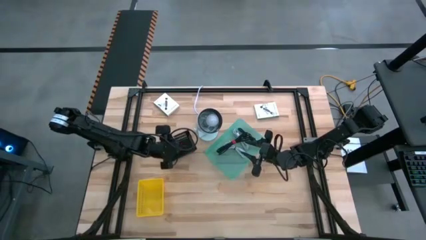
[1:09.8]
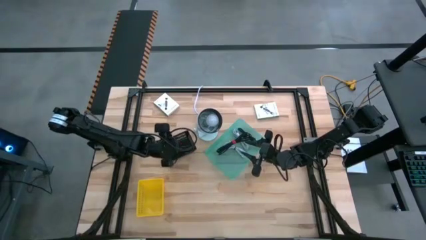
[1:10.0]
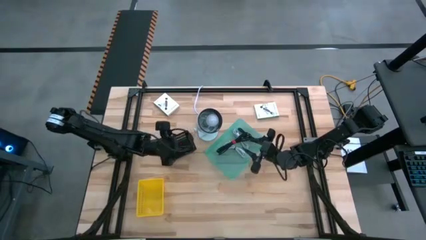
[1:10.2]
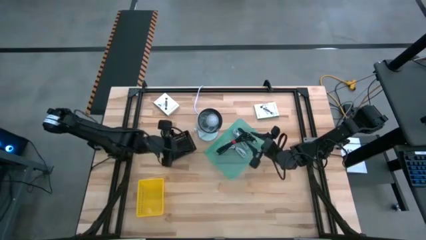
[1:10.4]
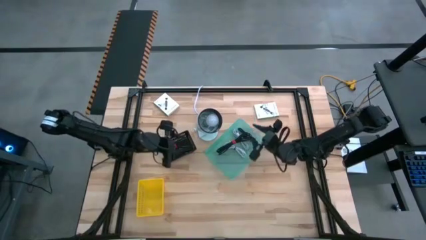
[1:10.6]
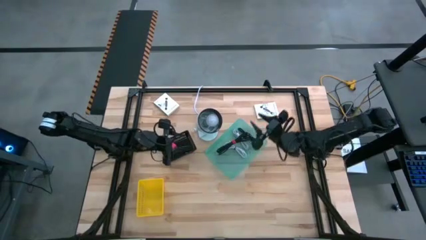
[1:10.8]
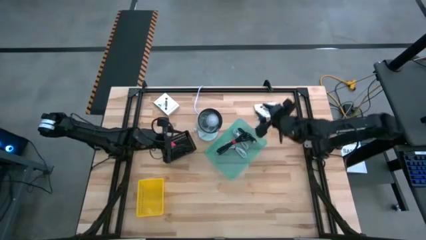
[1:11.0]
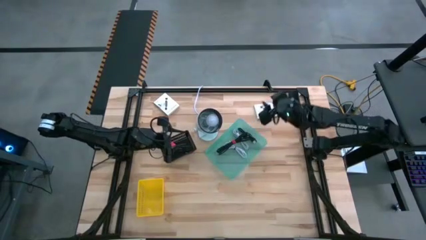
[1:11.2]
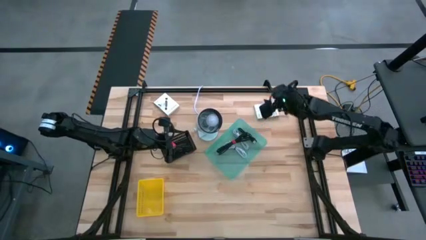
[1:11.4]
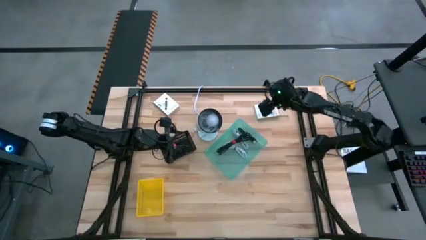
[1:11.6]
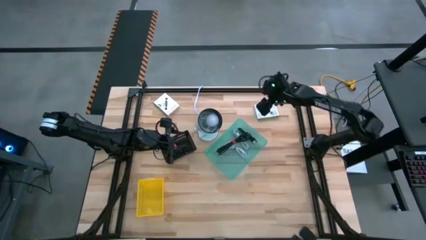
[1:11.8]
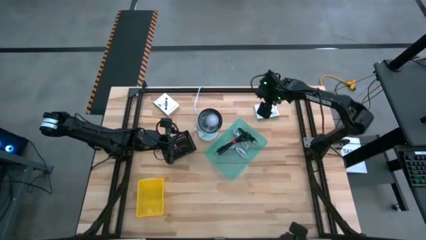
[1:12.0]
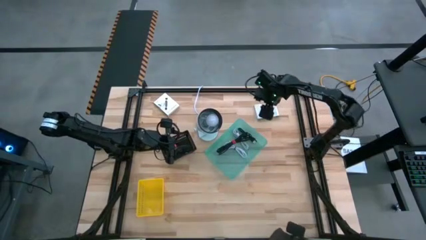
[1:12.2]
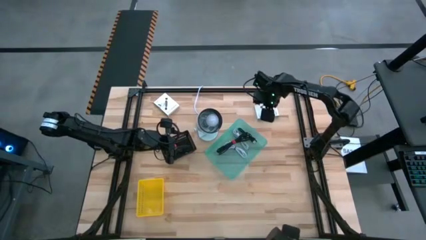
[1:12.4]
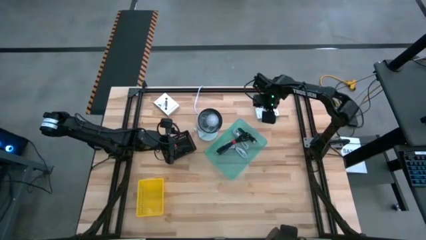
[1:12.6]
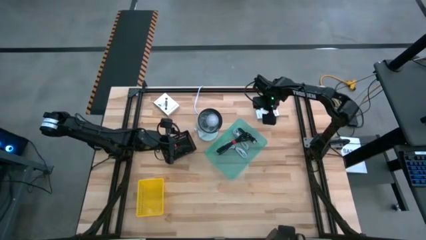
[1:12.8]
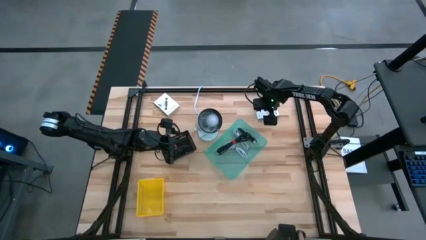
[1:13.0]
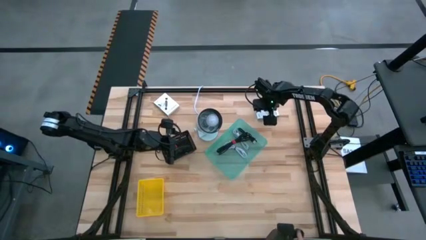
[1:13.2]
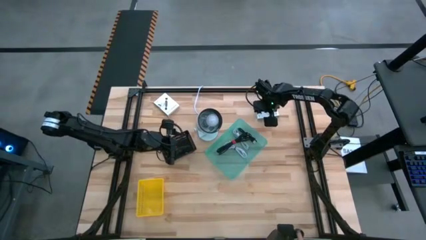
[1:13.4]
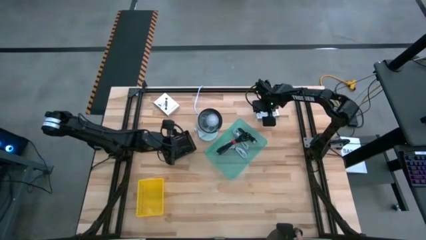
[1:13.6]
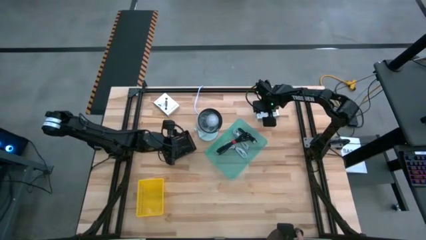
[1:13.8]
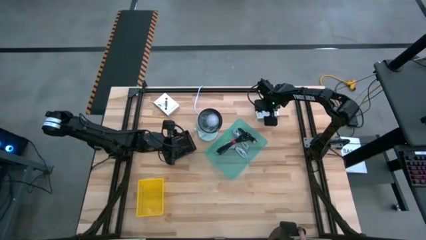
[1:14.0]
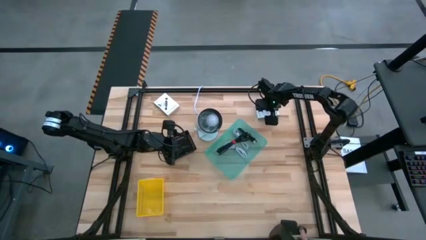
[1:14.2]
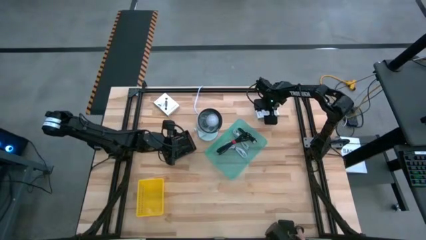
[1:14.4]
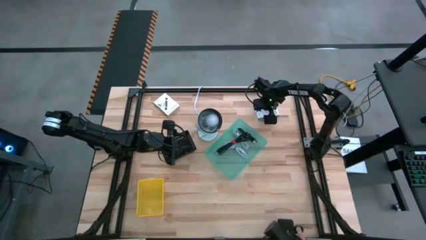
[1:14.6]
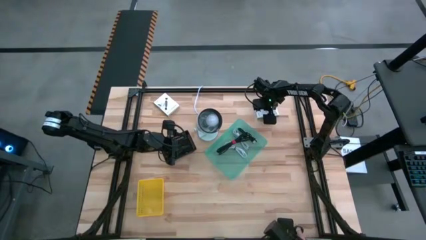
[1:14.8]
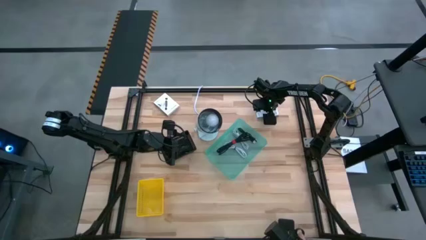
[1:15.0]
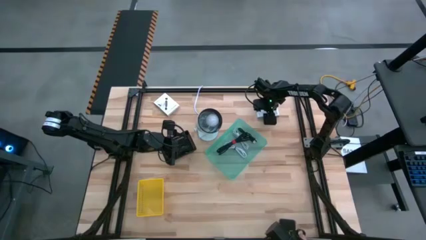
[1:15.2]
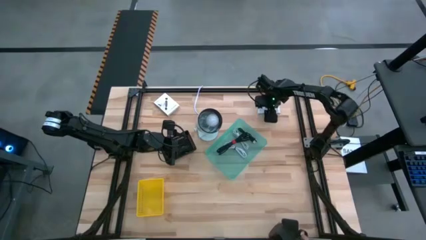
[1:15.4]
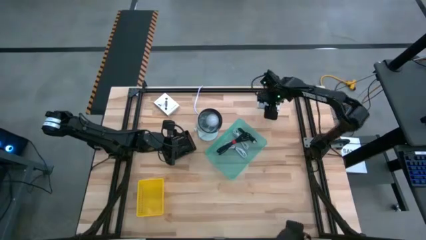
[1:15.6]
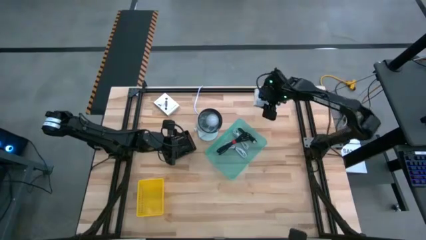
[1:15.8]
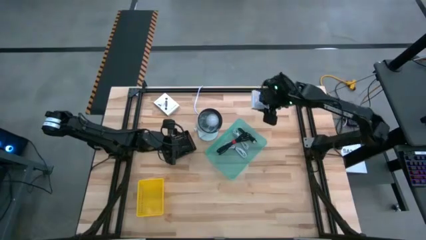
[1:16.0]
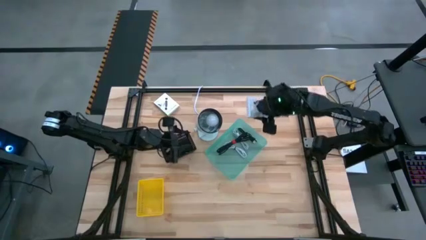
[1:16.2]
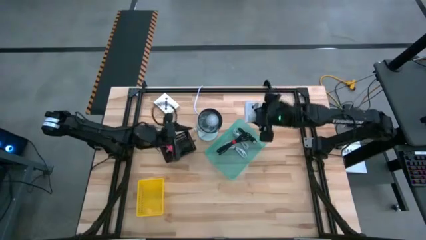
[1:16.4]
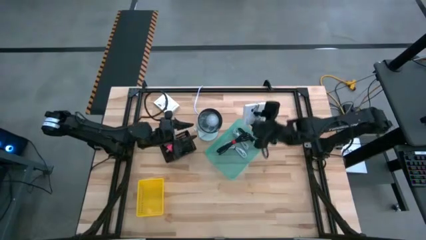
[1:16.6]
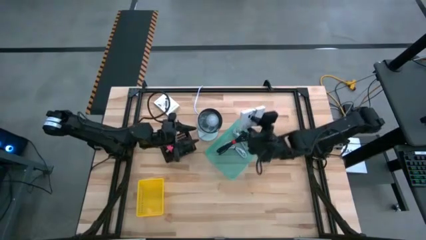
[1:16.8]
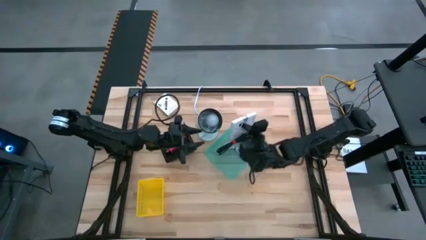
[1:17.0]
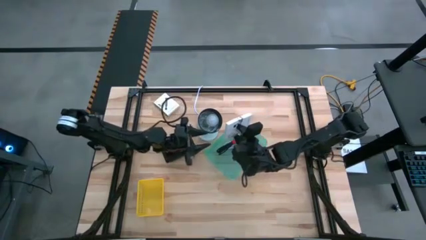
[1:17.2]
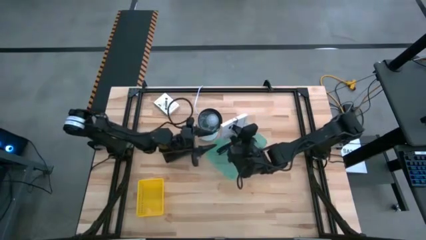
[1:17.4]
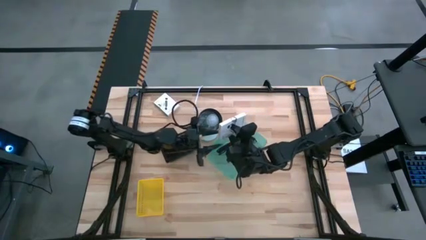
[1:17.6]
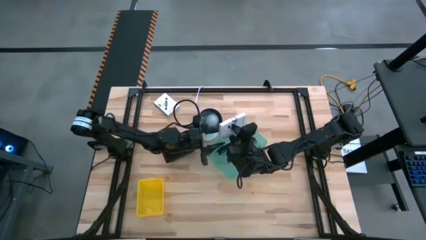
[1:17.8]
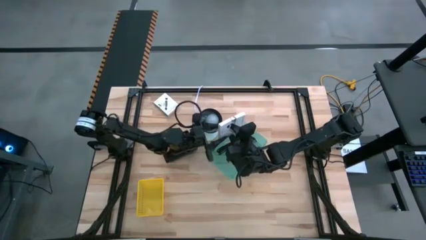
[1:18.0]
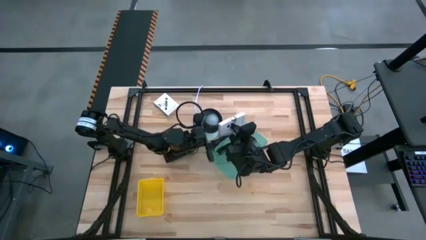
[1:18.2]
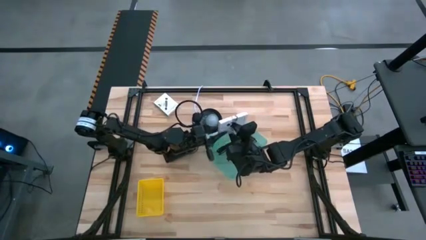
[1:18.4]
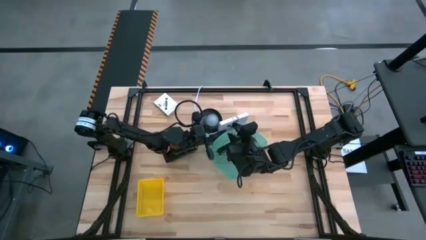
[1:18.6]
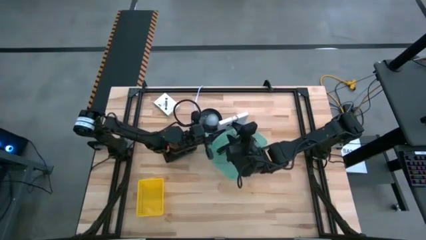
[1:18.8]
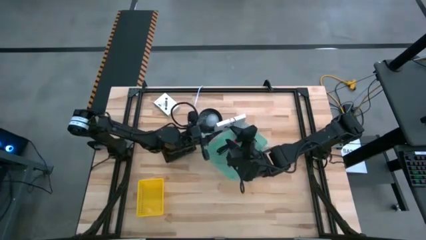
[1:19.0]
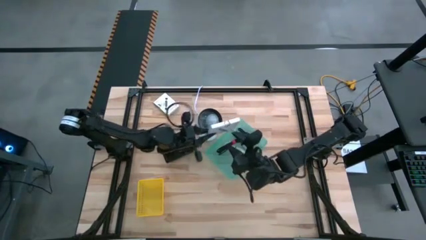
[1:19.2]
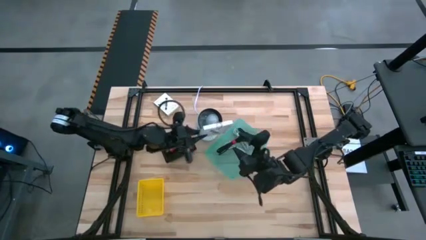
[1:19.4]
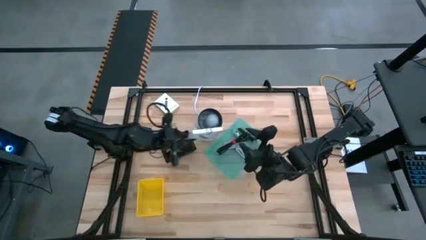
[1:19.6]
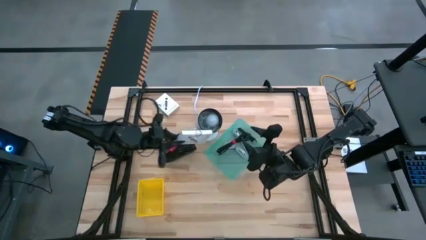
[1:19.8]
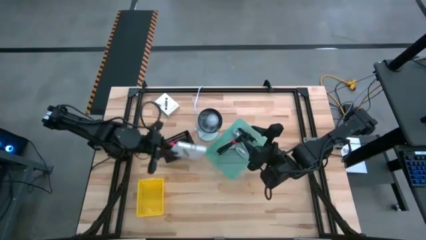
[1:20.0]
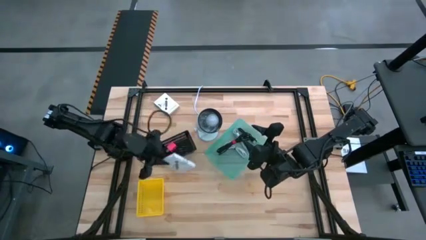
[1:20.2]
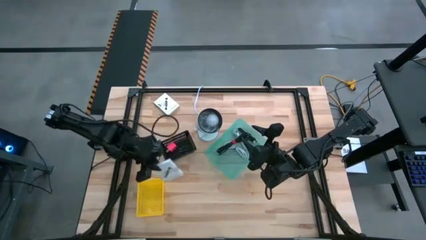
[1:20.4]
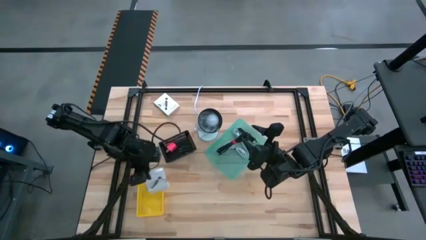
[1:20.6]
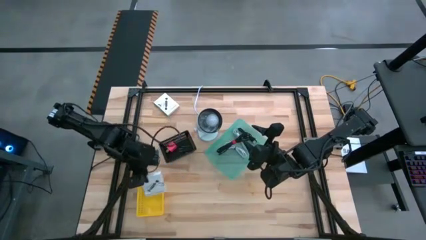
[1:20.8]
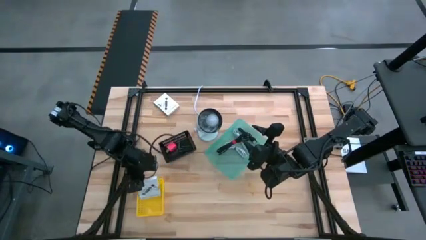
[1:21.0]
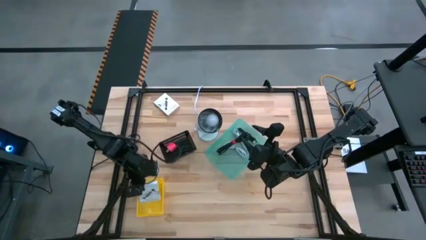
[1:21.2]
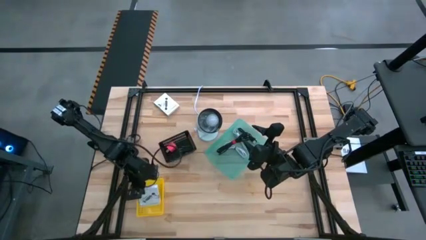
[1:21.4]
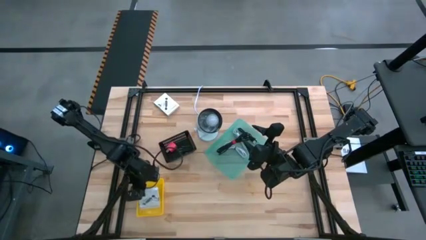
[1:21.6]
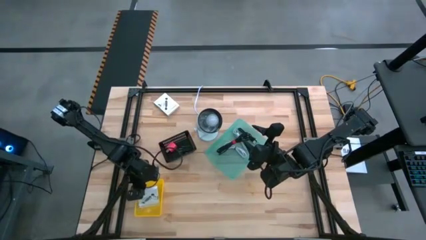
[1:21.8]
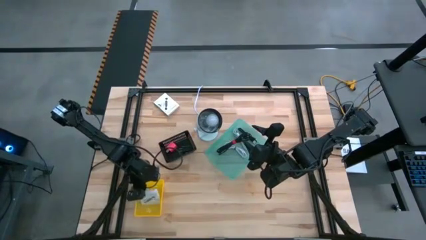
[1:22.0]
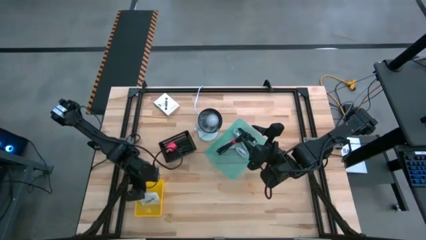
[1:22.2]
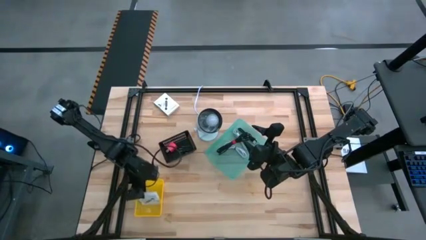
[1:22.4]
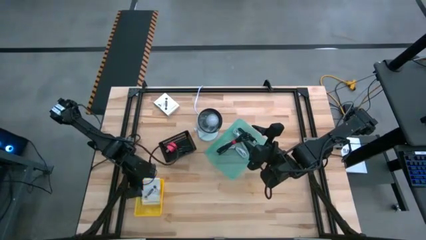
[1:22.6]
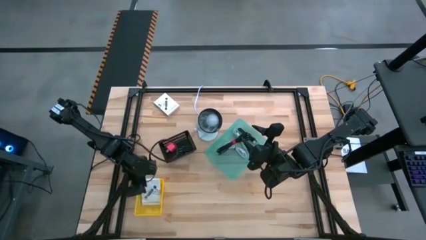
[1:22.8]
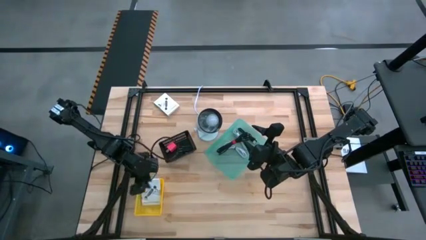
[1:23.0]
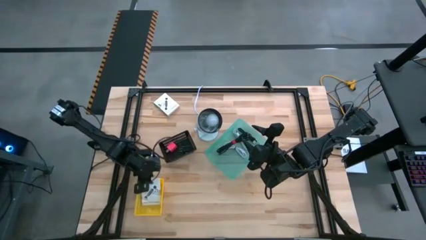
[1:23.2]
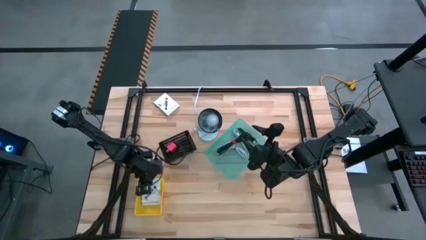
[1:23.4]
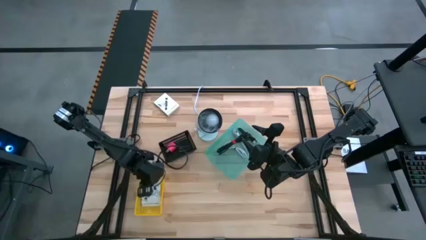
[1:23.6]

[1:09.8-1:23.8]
Task: Pick and place items into bin
Put the right white card reader box into the yellow bin

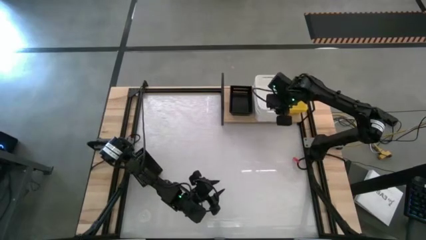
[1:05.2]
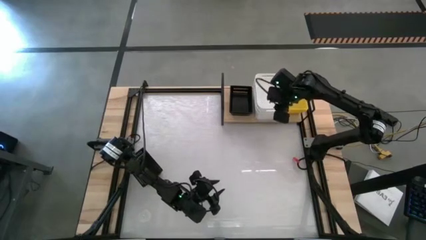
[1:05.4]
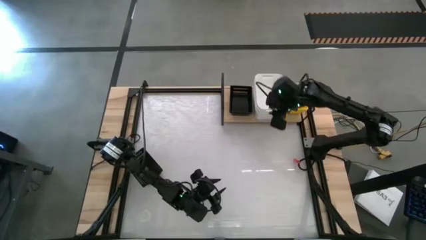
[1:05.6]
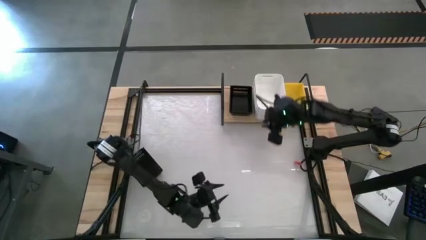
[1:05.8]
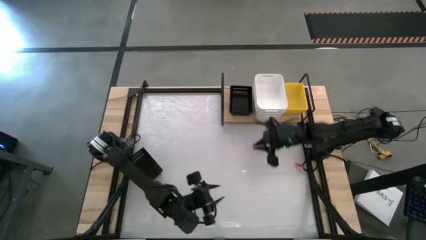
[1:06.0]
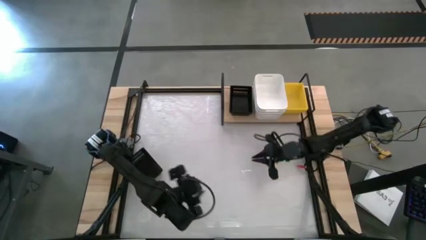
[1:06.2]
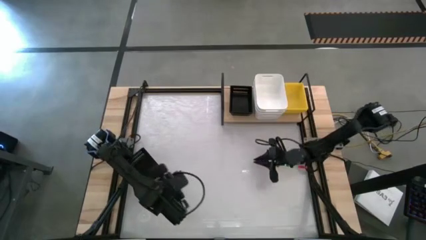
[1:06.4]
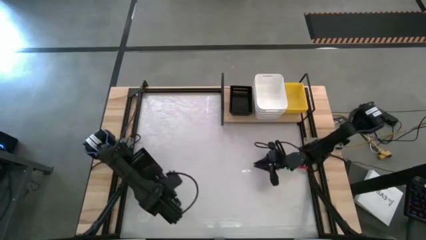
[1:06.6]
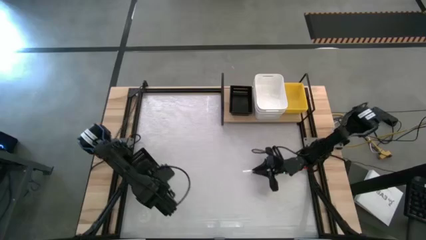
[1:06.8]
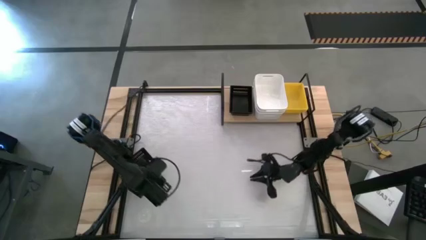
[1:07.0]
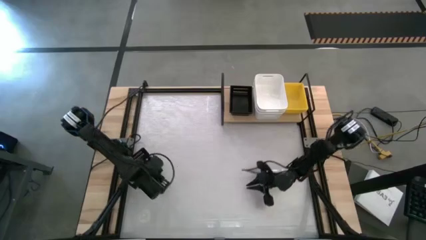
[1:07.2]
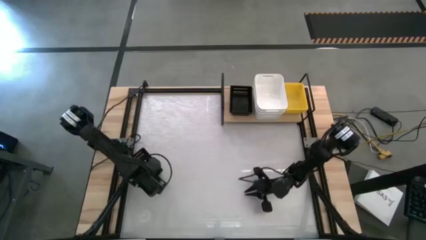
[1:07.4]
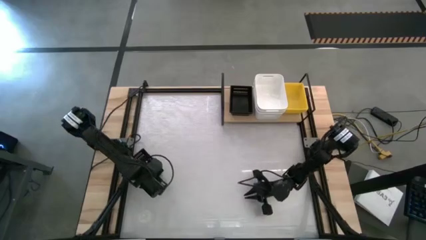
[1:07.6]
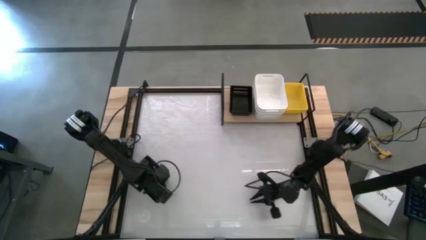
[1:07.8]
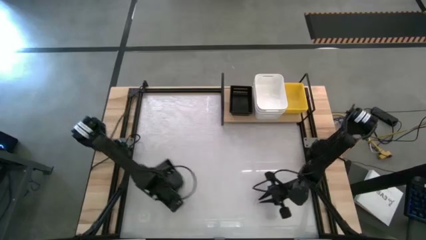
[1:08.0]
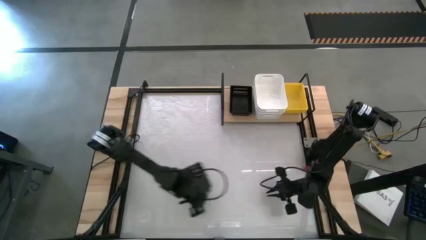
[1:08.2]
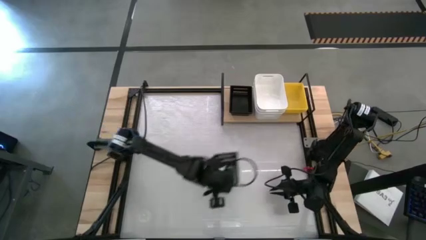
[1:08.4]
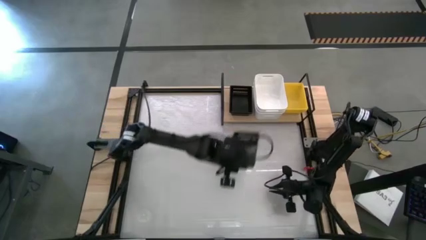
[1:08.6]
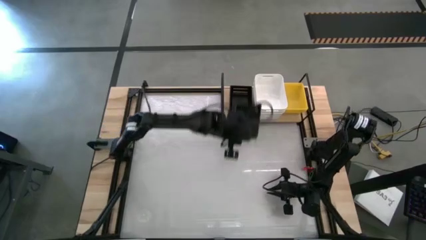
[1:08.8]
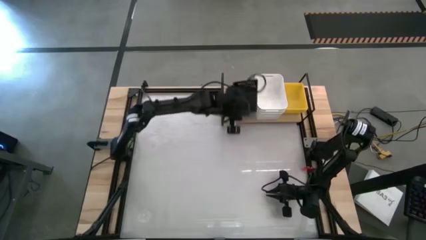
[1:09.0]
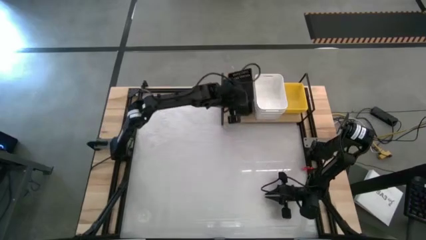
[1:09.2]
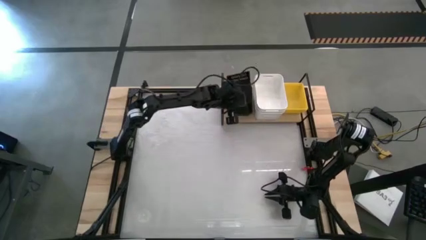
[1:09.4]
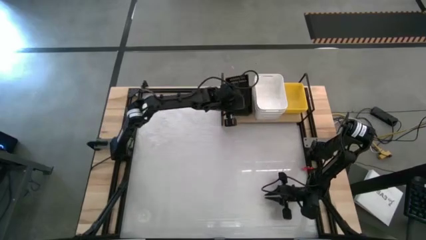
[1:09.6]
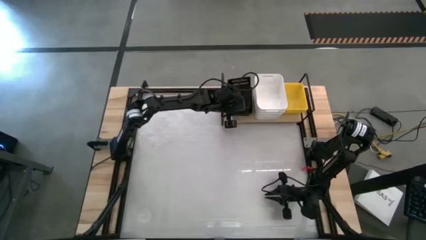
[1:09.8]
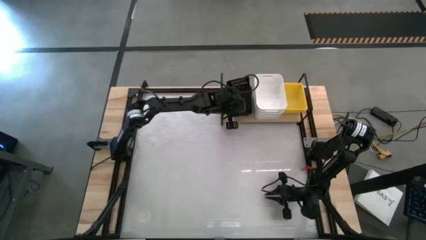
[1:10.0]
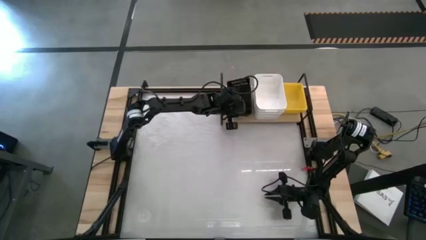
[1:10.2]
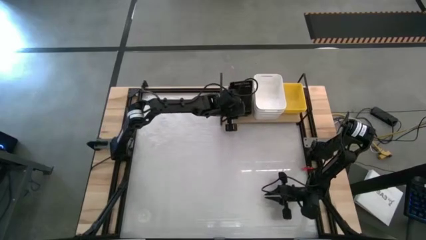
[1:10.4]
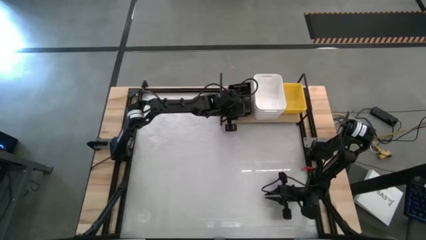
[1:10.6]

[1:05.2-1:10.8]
Task: Stack baskets on shelf by color
Stack the black bin into the black bin on the shelf
